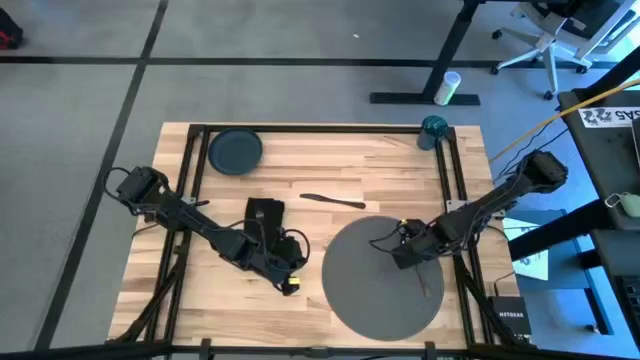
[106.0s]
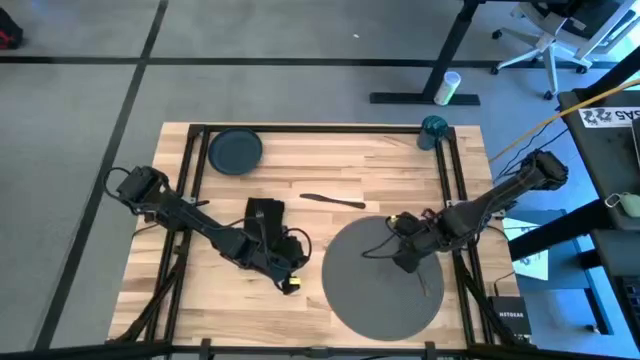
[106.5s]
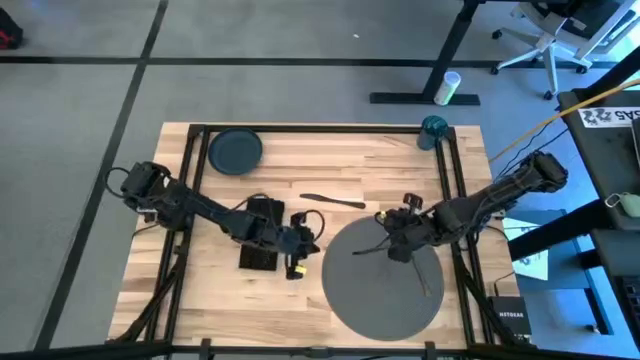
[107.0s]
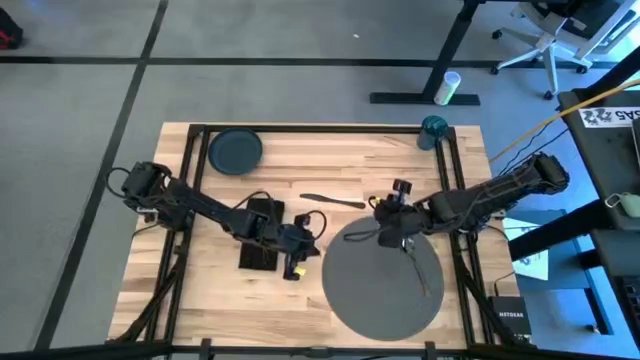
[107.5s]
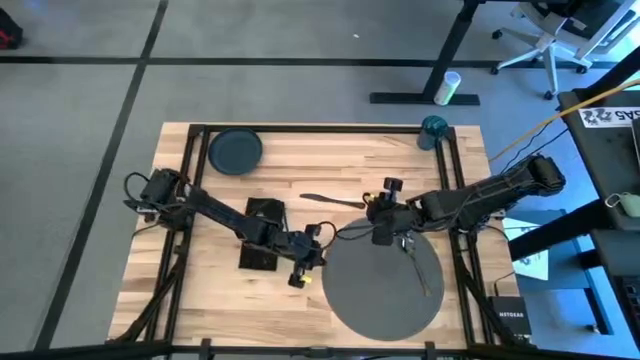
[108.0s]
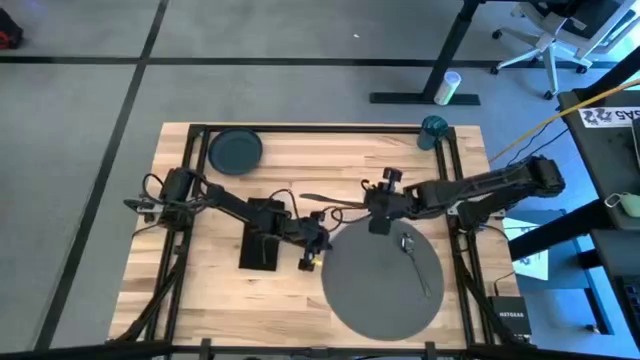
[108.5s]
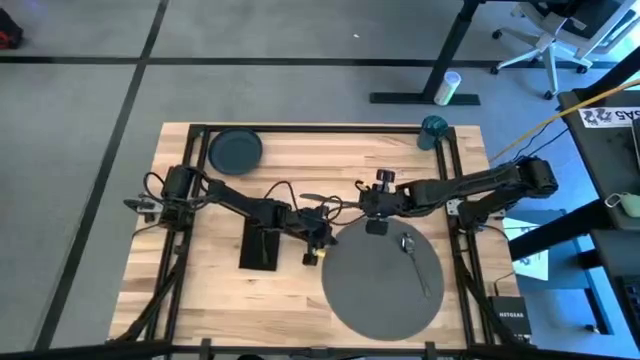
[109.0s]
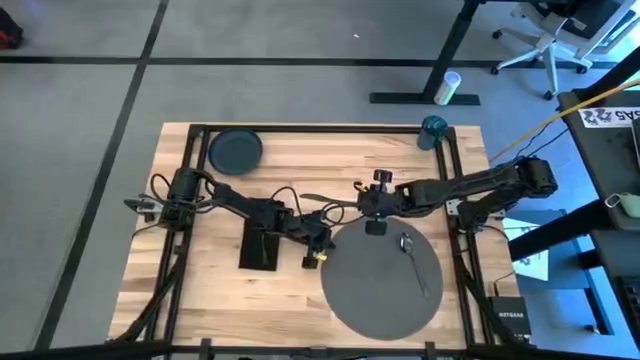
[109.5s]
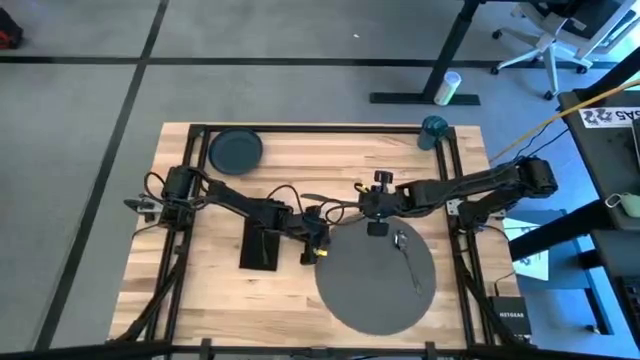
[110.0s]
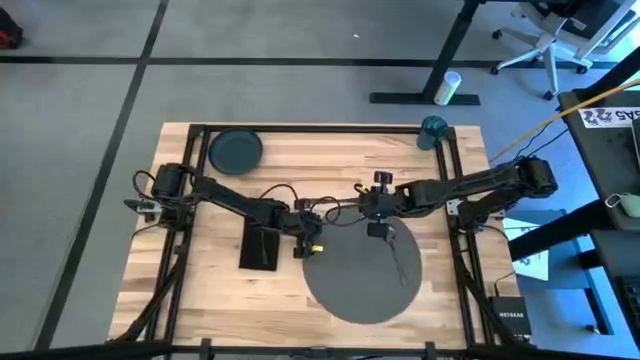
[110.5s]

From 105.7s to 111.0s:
Task: Set table place
Move the gray table mat to the center of the table

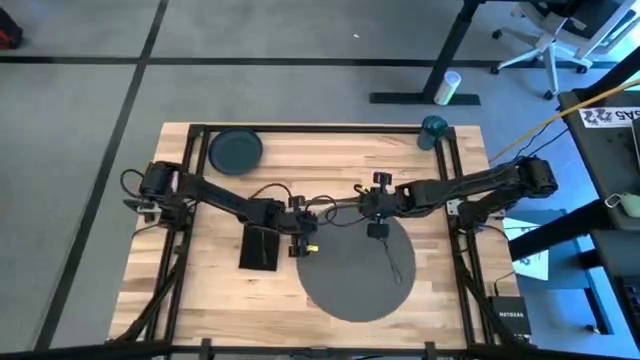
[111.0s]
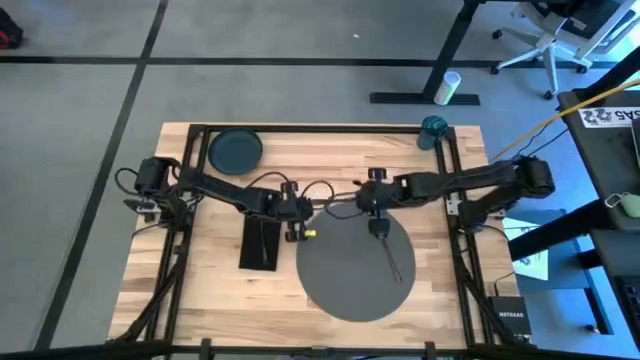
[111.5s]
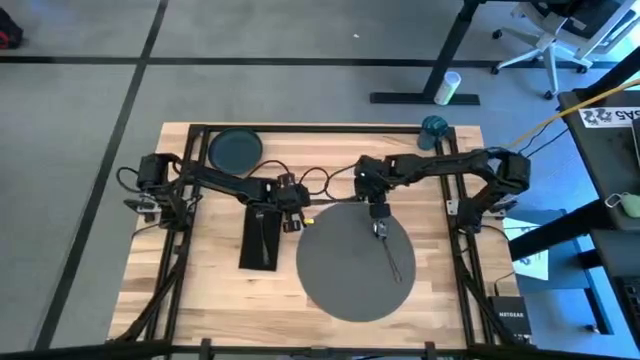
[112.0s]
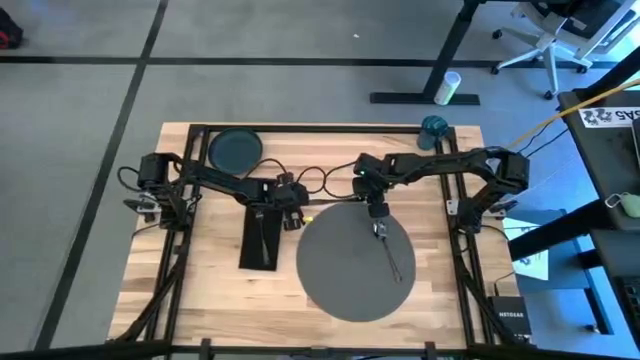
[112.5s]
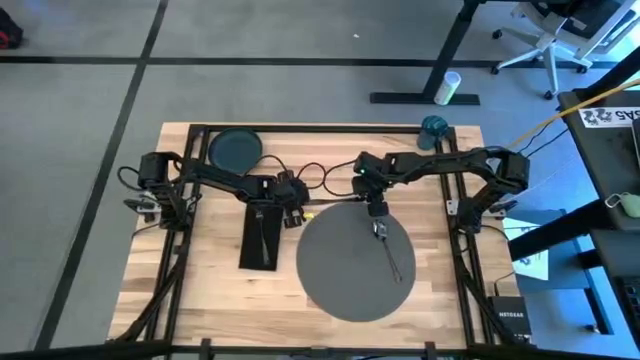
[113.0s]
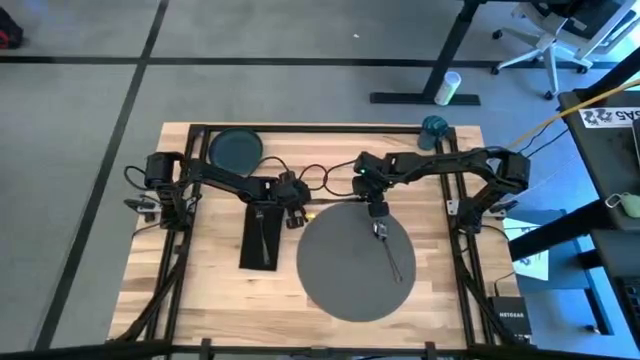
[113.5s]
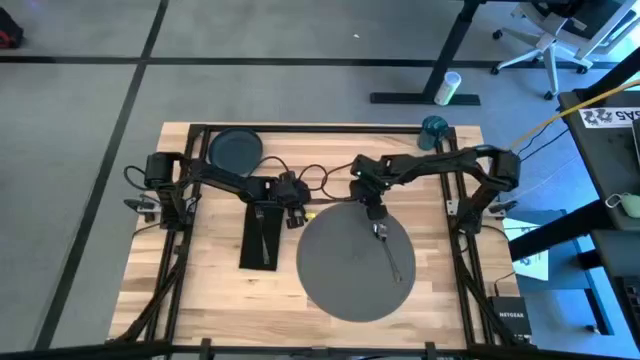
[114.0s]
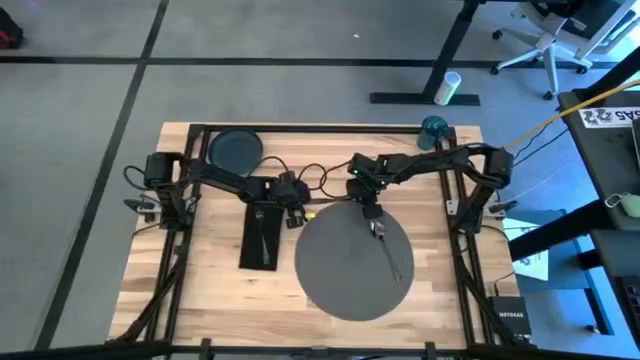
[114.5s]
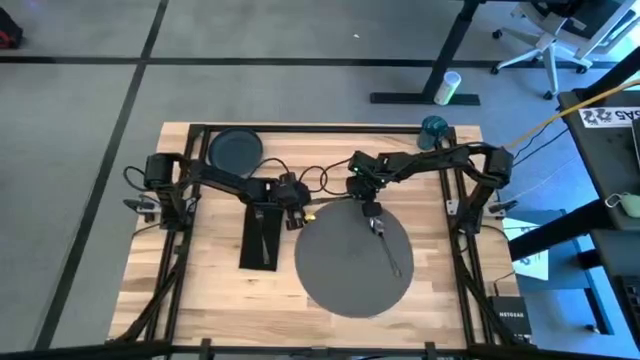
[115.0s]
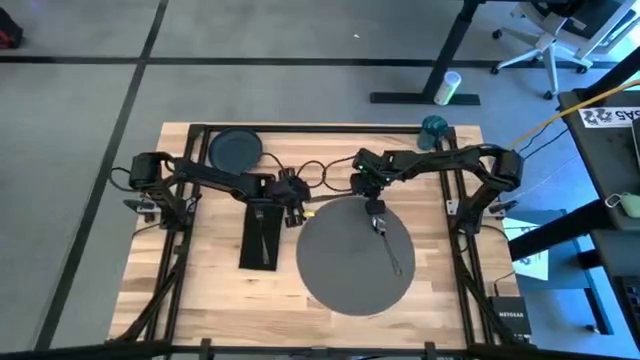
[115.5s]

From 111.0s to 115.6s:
Put the black knife on the gray table mat

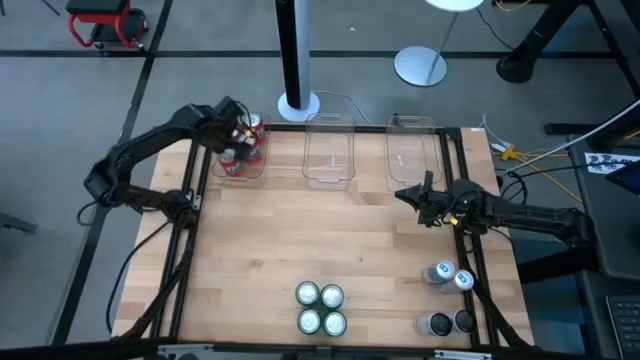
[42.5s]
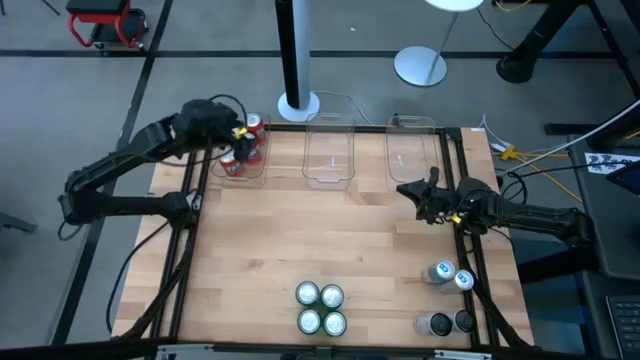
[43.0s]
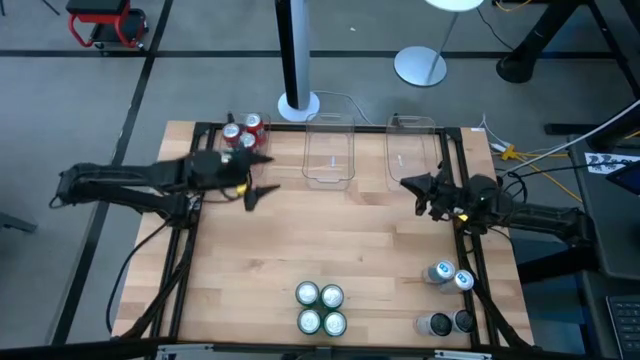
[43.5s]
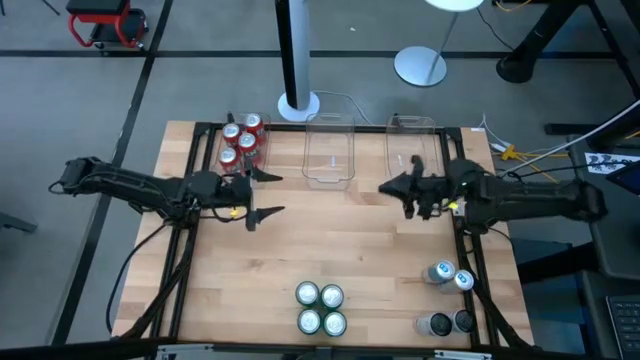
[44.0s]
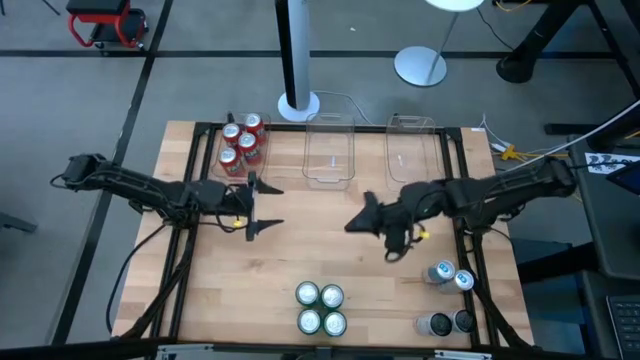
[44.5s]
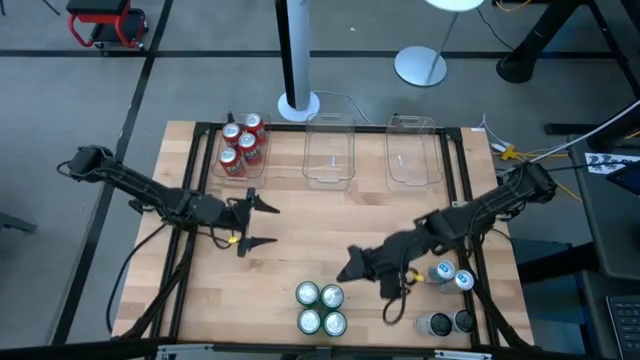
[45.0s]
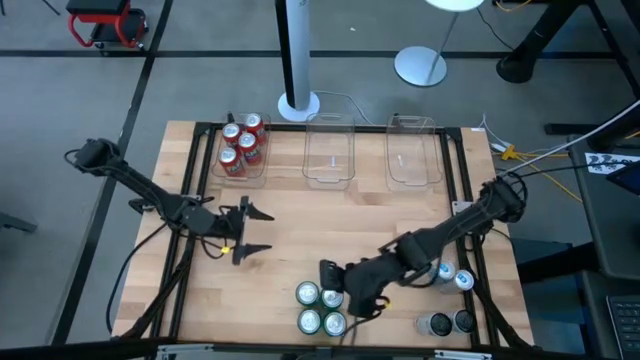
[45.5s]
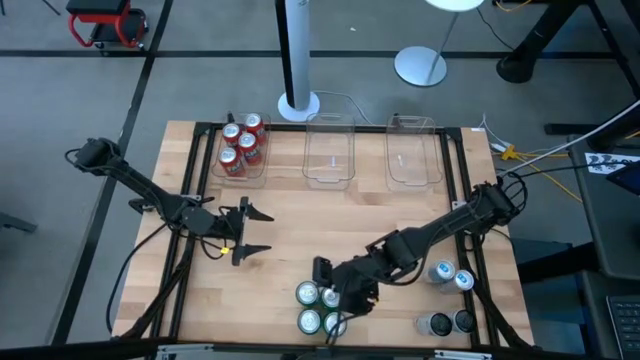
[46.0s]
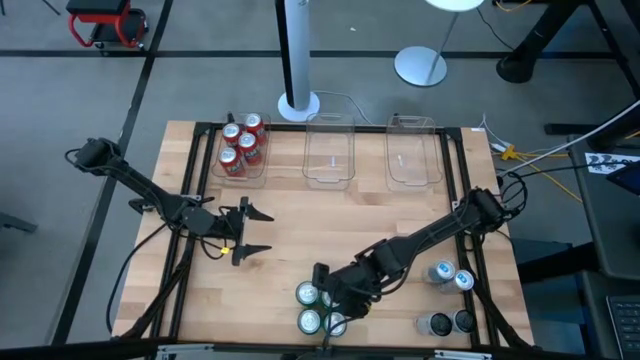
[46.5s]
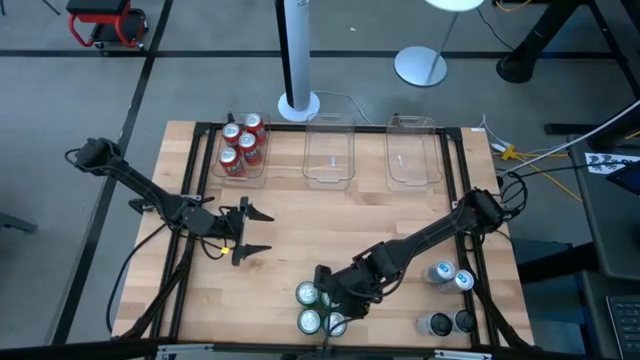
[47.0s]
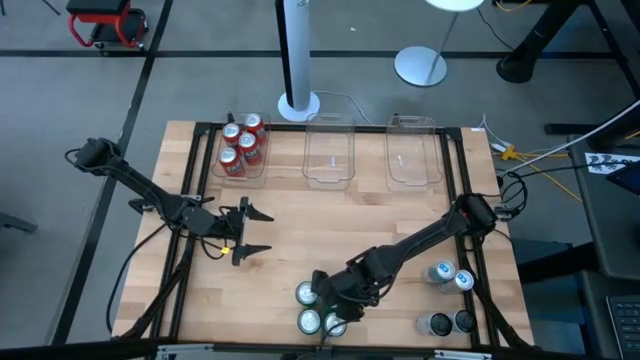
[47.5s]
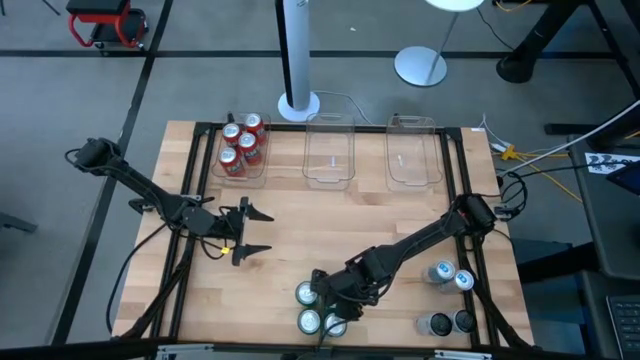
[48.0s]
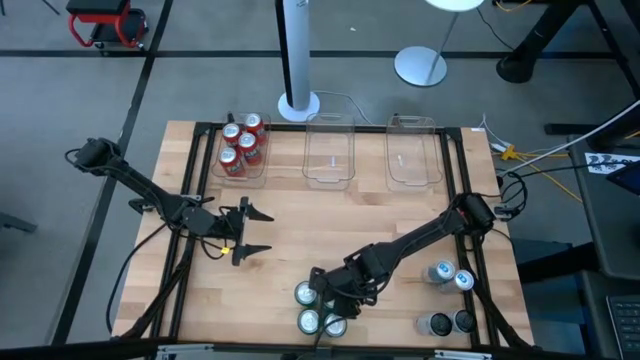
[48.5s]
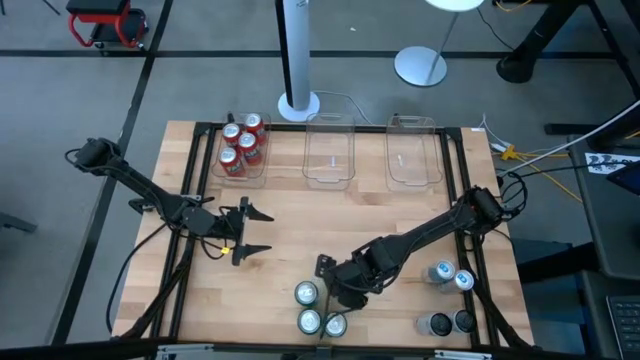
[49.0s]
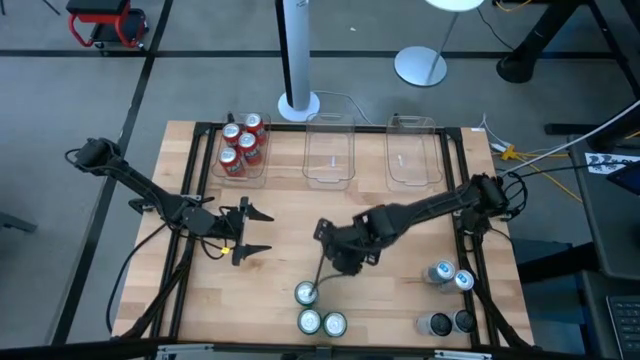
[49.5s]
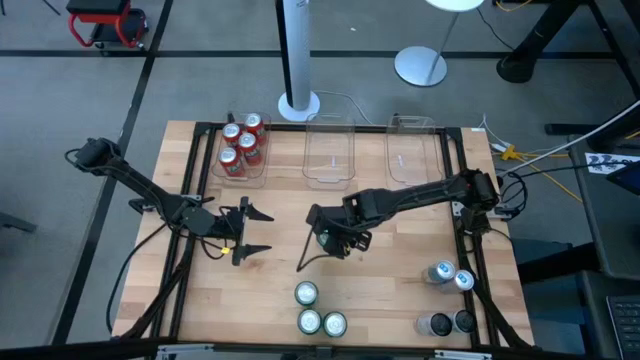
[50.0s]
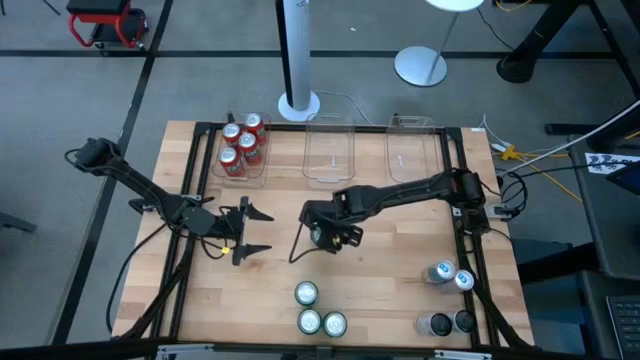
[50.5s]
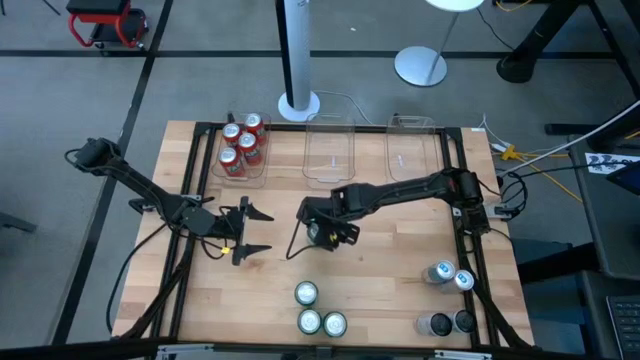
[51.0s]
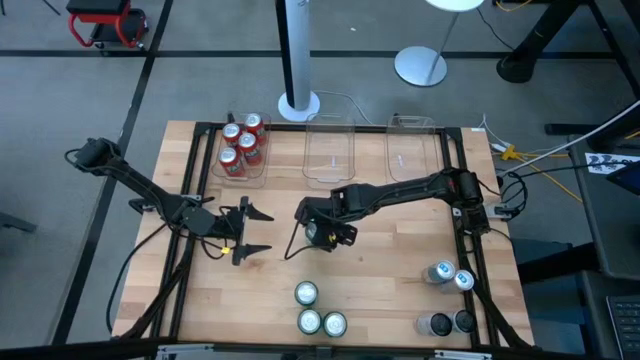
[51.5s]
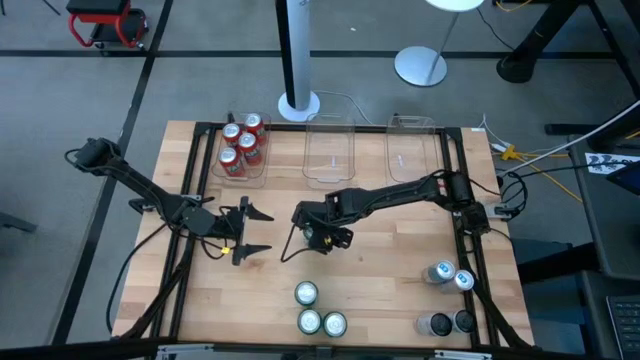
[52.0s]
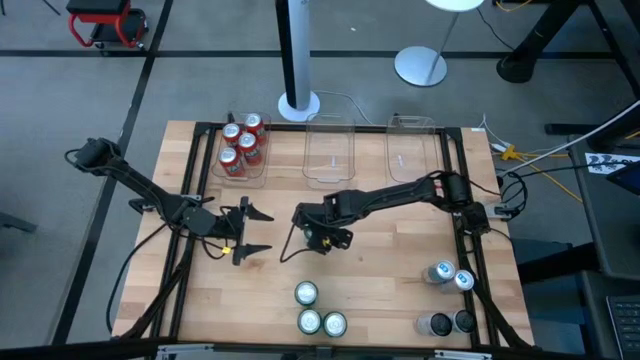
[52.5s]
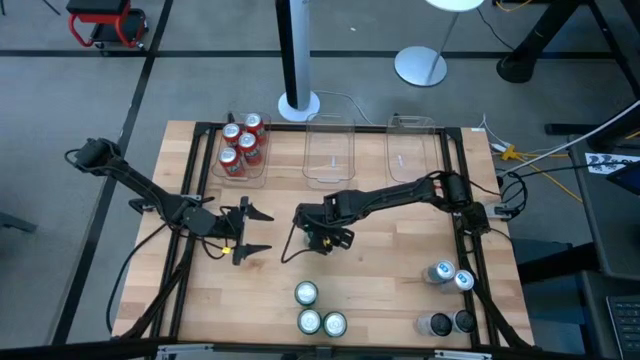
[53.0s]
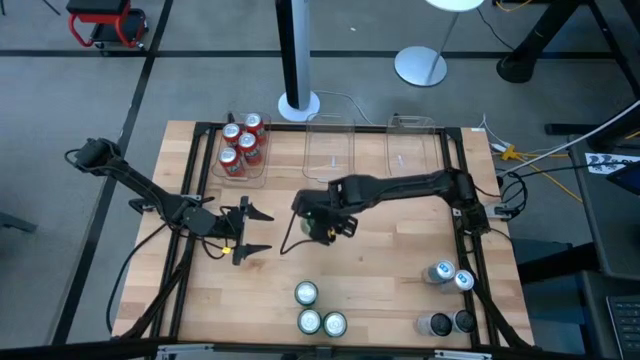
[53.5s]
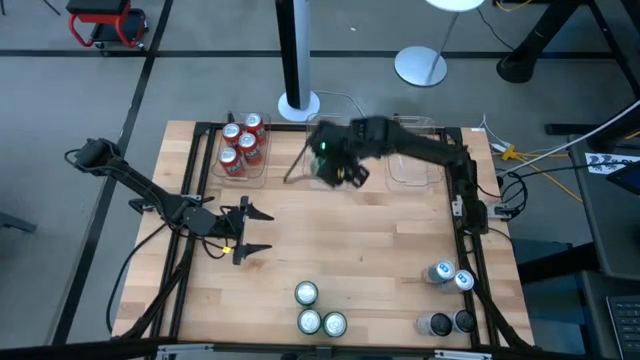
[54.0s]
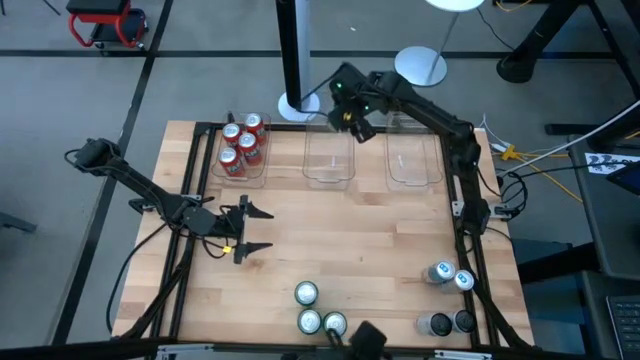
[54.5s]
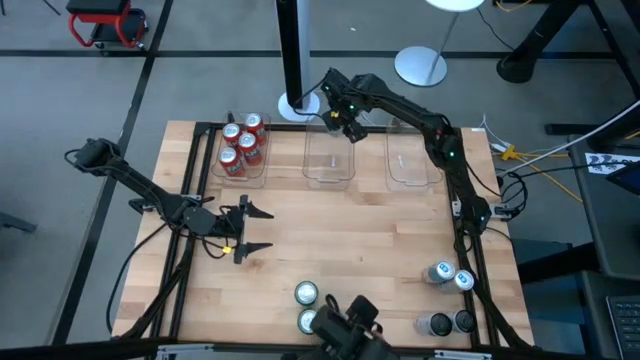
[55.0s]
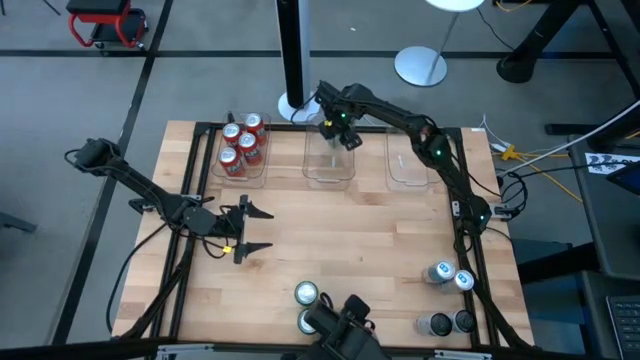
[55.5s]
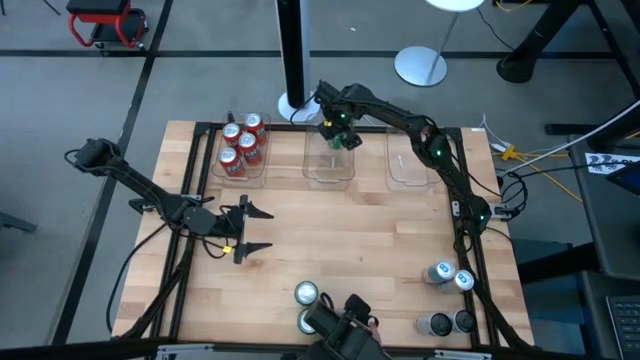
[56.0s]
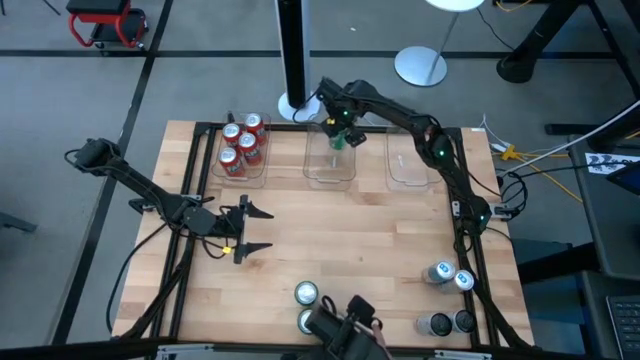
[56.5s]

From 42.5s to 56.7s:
Task: Sort soda cans
Put the top right green soda can into the middle transparent bin
